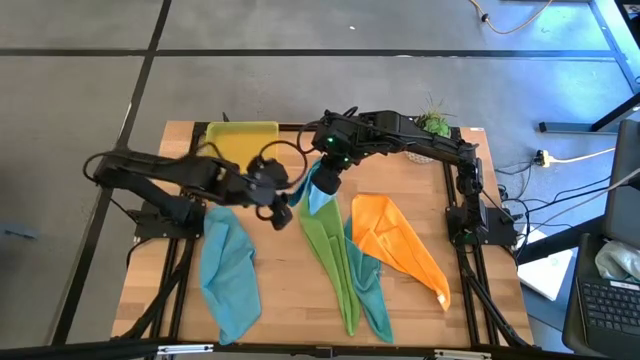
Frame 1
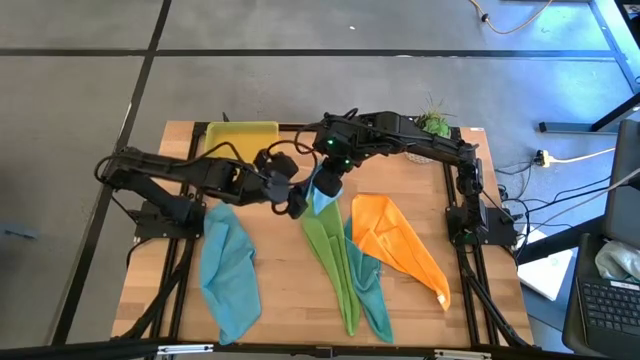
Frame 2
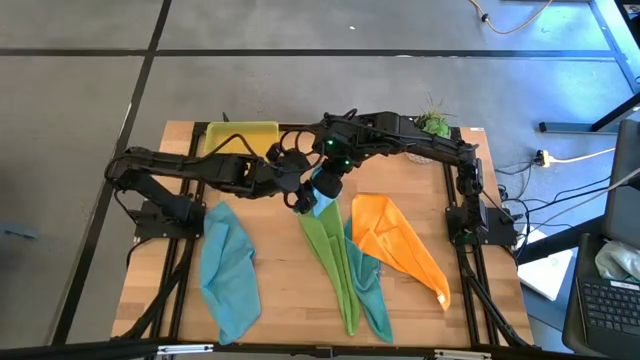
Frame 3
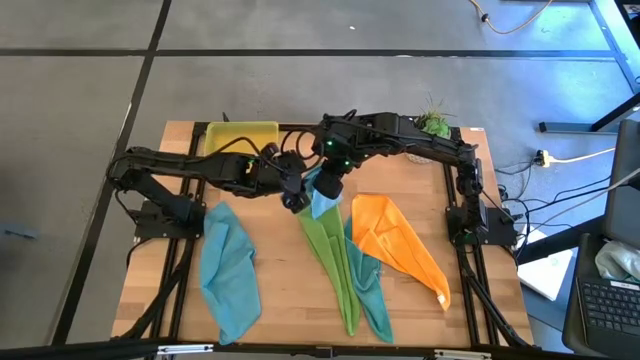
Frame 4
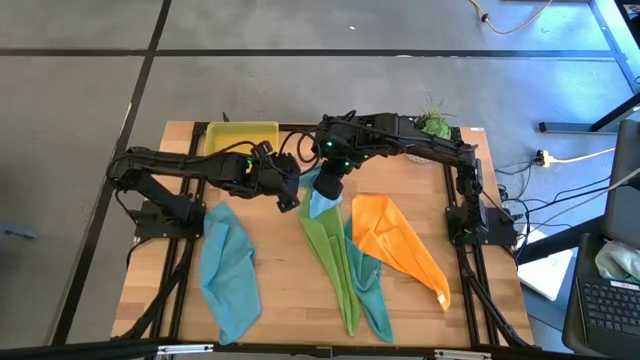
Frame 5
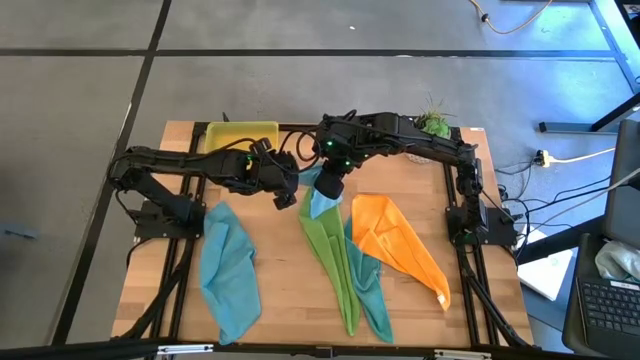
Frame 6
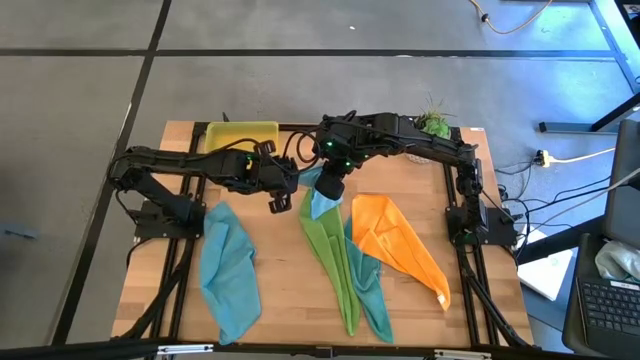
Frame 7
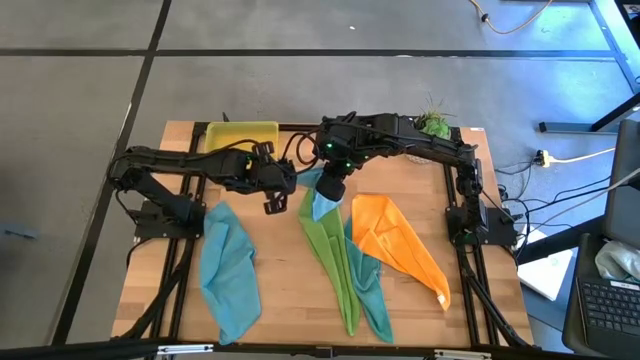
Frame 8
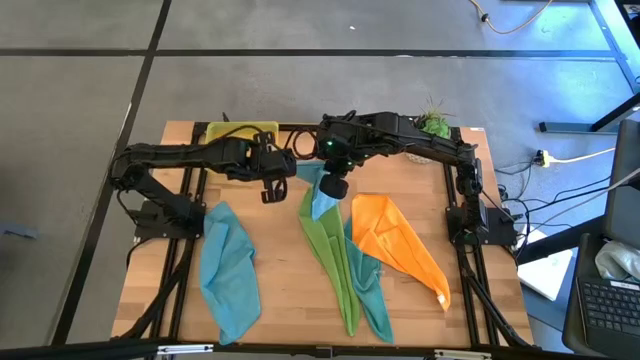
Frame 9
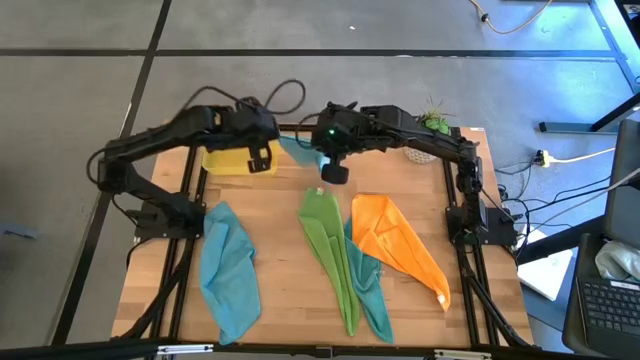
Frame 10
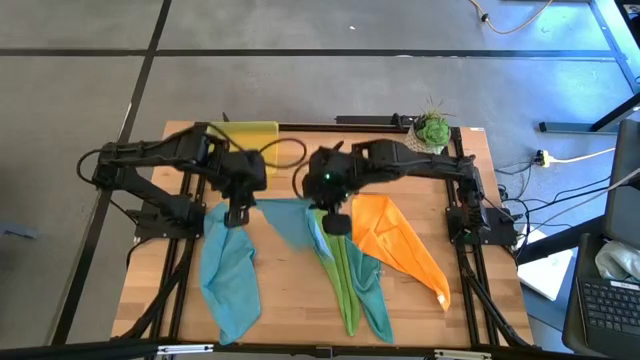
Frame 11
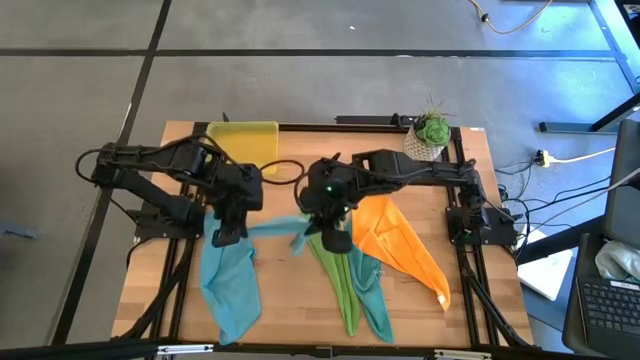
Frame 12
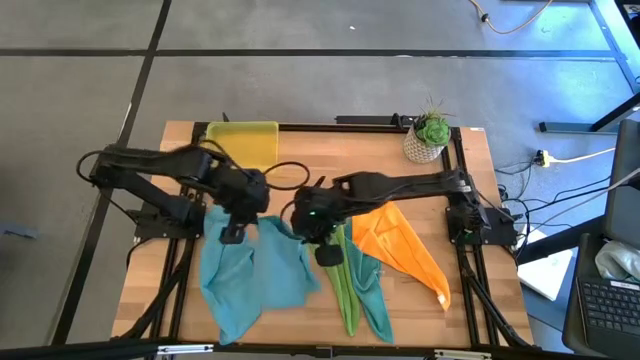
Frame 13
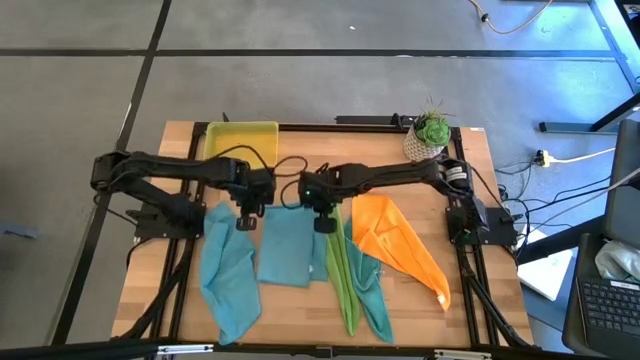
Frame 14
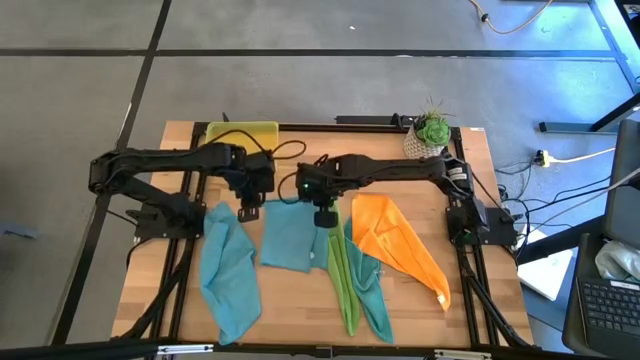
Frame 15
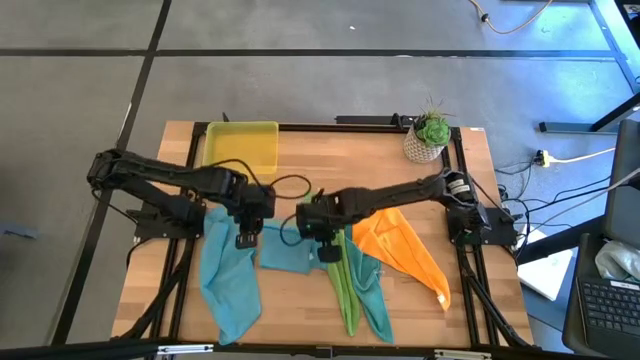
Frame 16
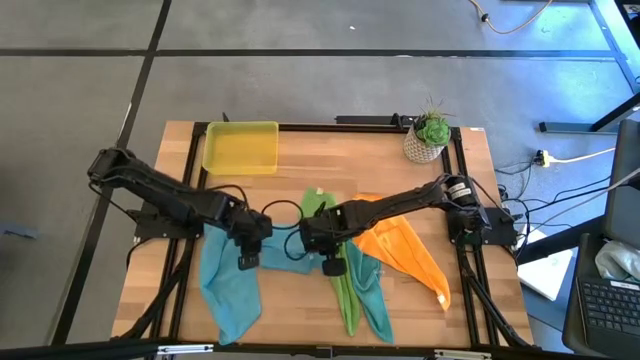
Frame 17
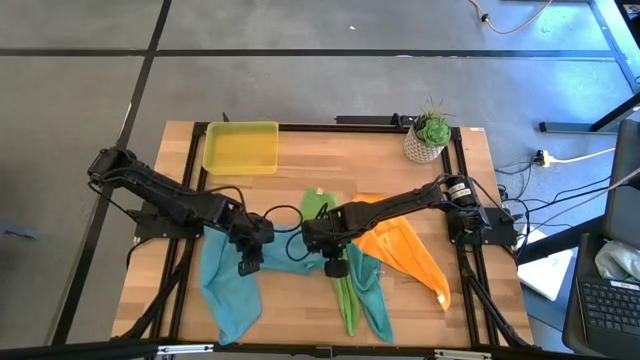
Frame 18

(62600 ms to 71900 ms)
Task: Fold microfiber towels
Fold the center blue towel

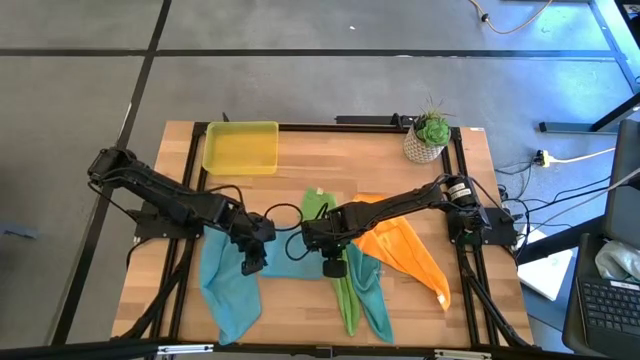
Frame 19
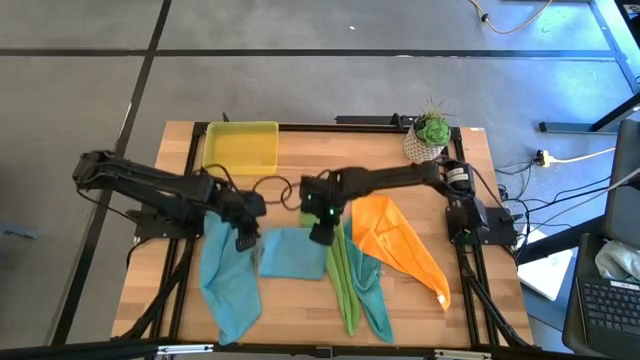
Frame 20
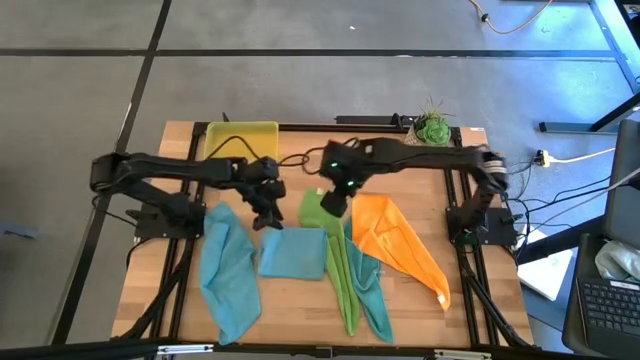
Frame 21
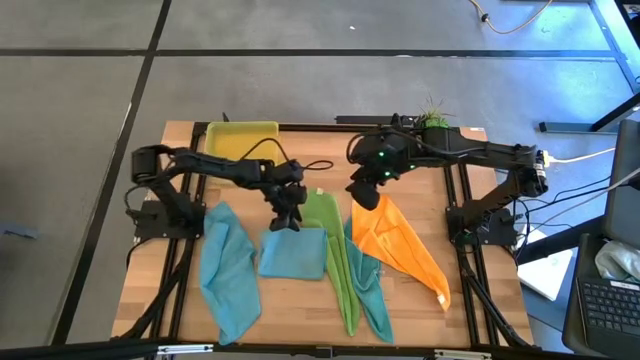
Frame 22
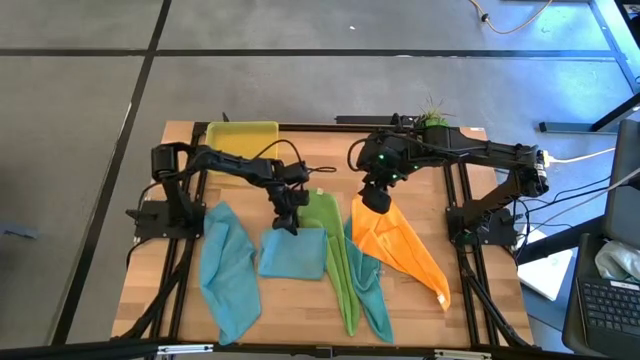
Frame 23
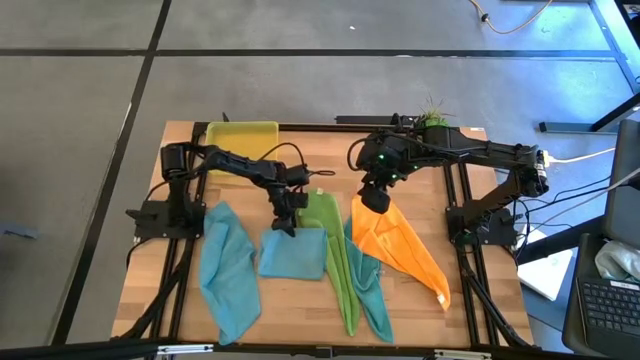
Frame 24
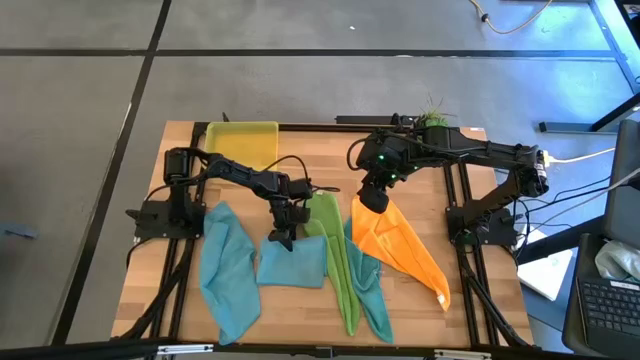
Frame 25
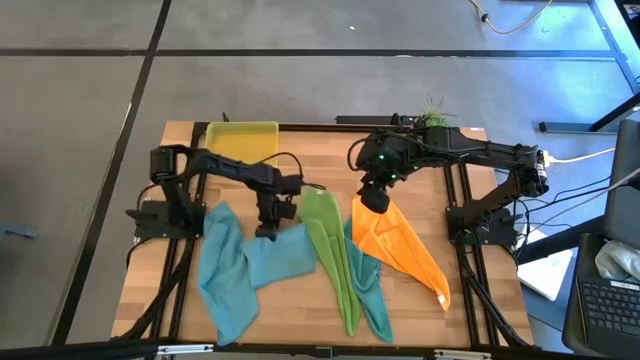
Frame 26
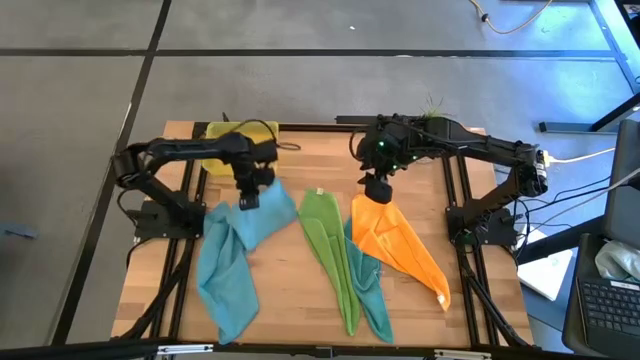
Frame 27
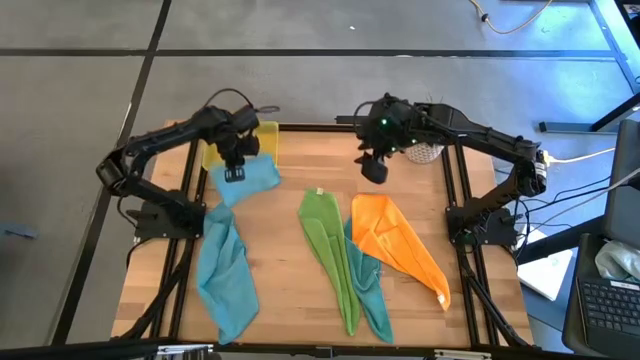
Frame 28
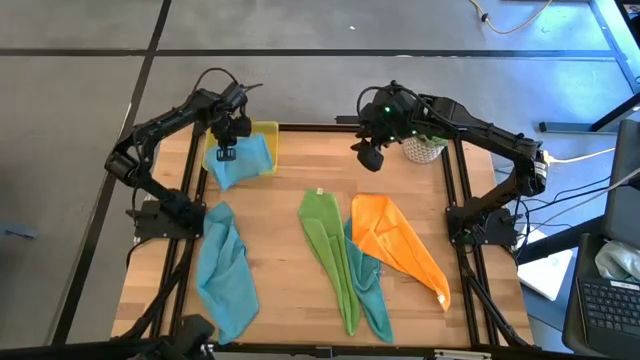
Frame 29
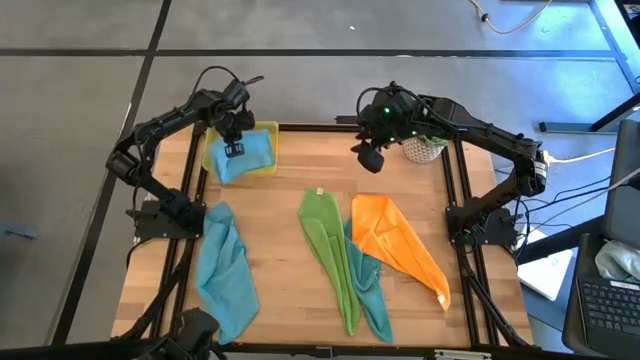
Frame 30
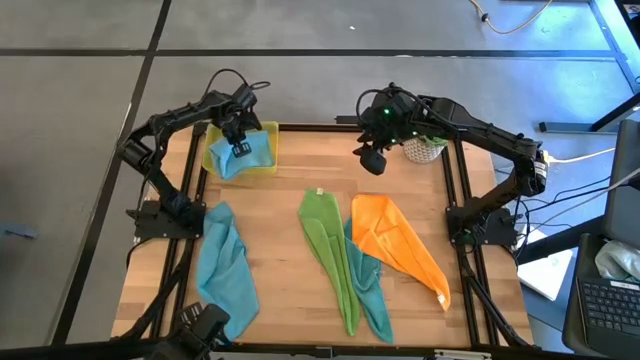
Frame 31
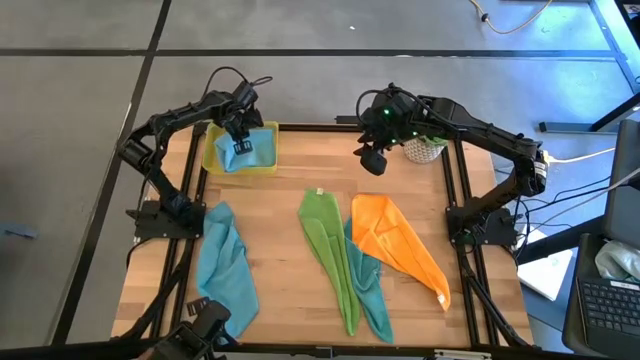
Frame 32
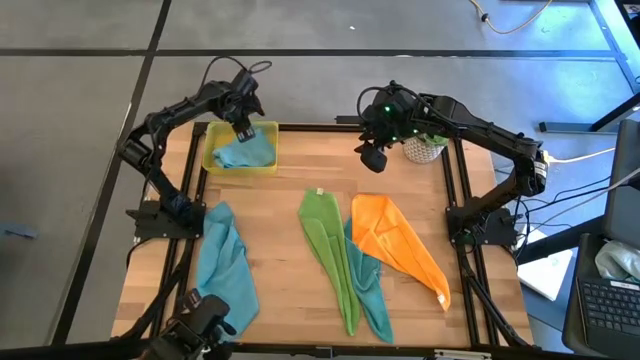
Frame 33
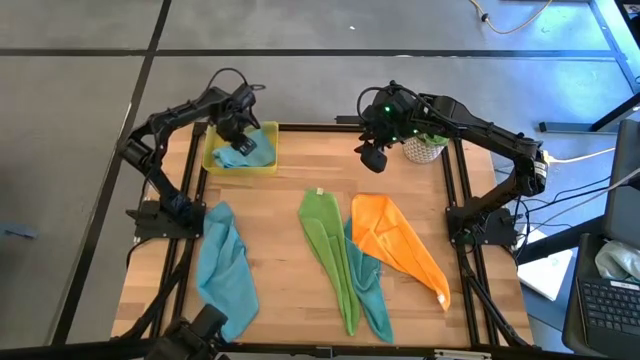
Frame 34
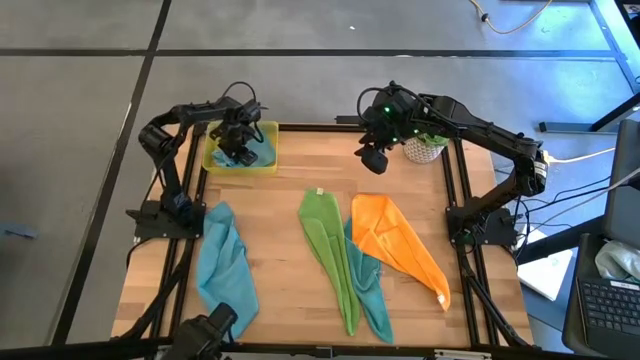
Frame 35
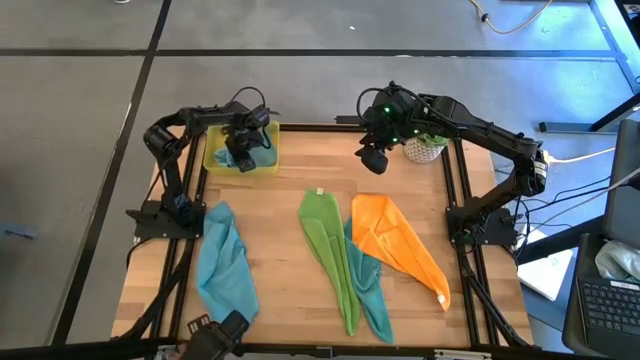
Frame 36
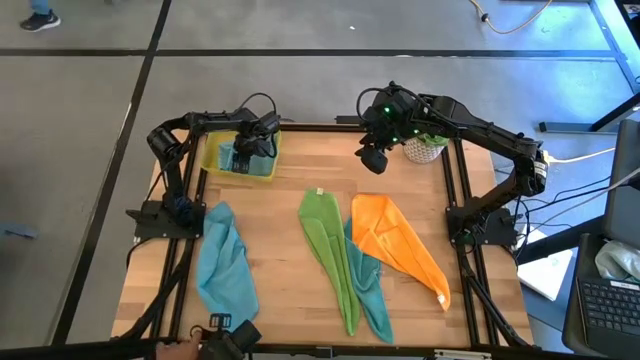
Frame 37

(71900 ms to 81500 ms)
Put the folded blue towel into the yellow bin

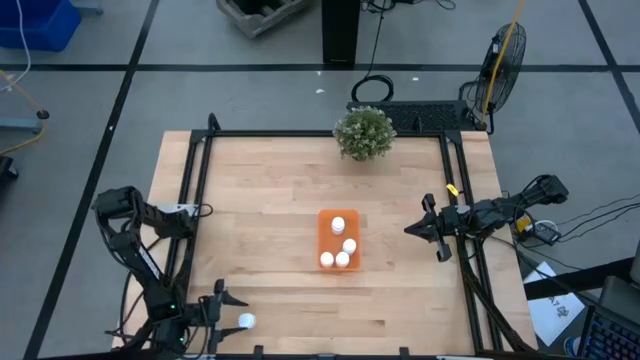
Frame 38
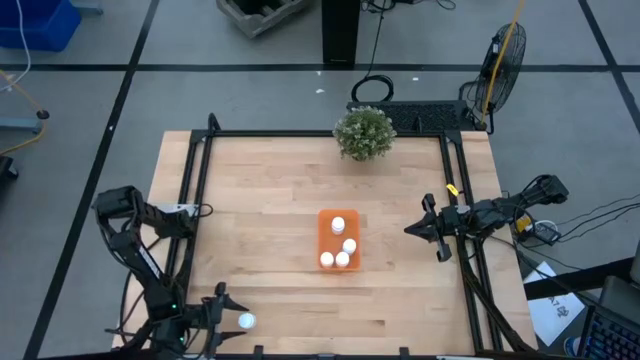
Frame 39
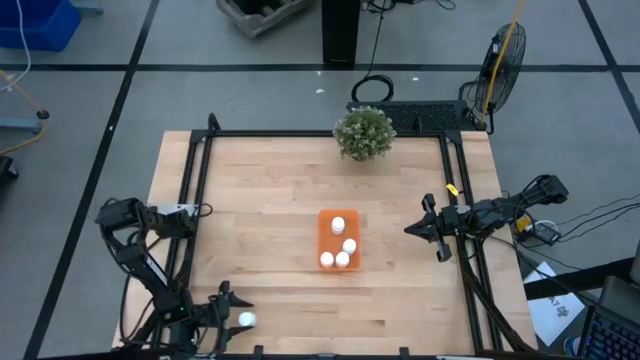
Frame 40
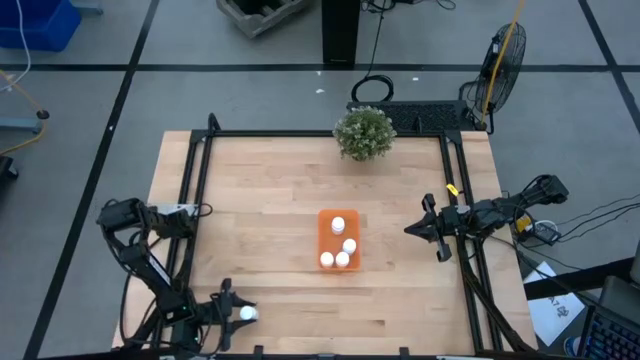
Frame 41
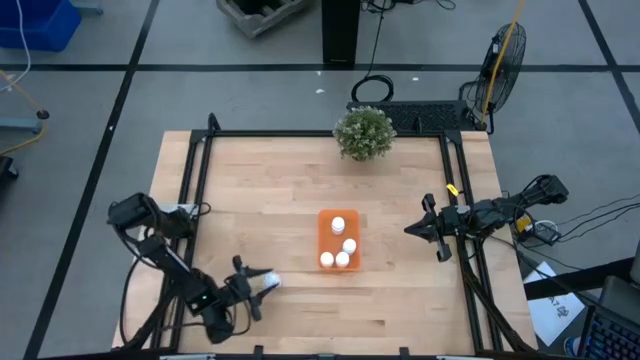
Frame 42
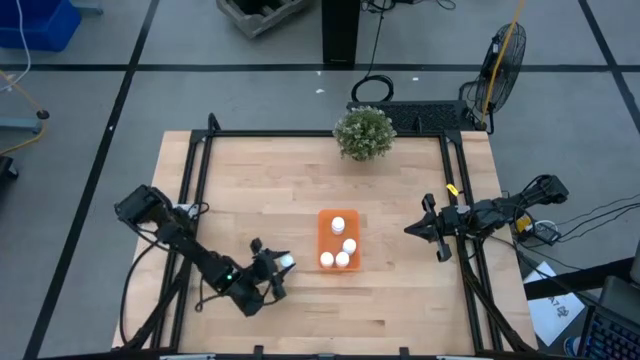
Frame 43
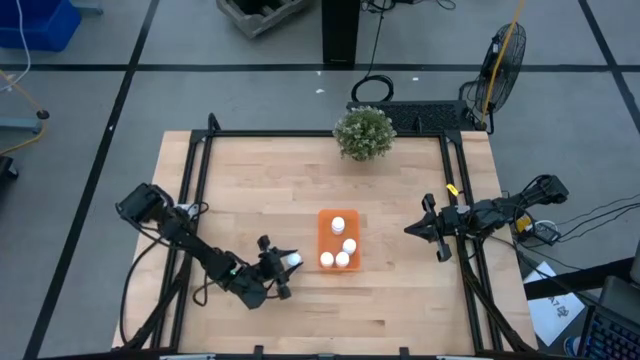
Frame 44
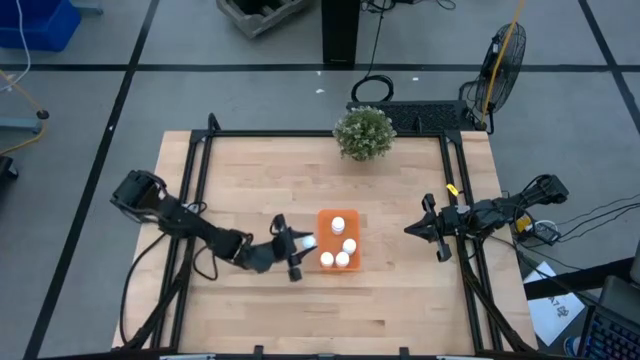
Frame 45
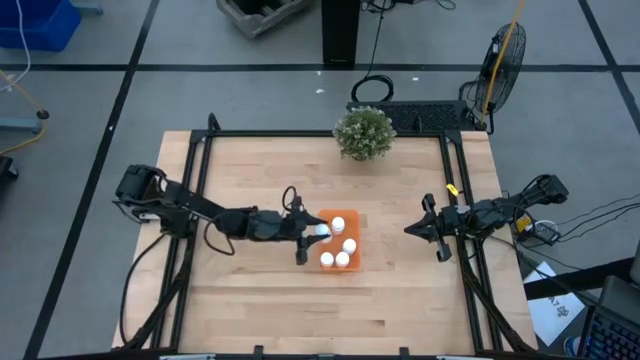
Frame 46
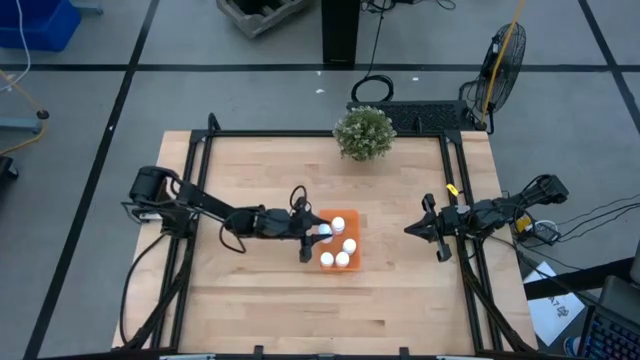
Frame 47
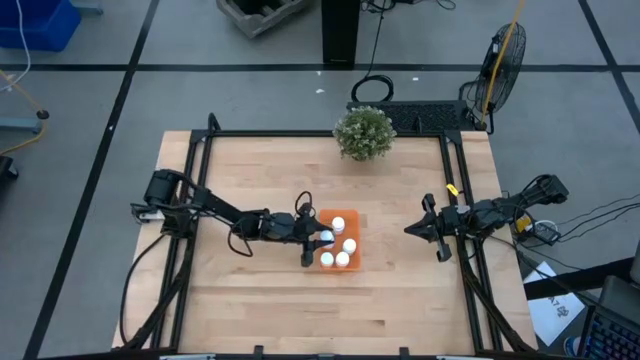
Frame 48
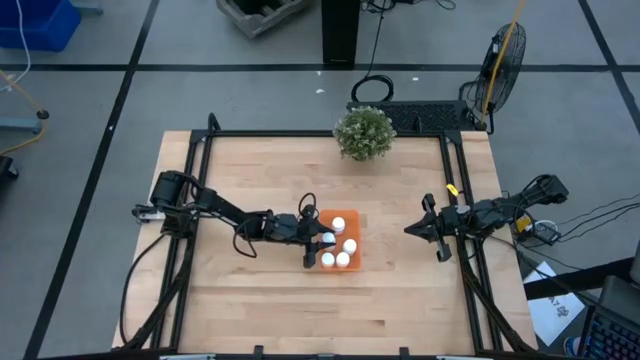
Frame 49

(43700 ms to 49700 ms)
Task: Pick and place pill bottles into a basket
Put the white medicine bottle into the orange bin
